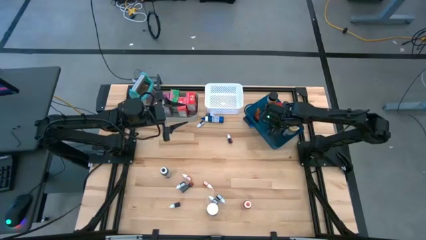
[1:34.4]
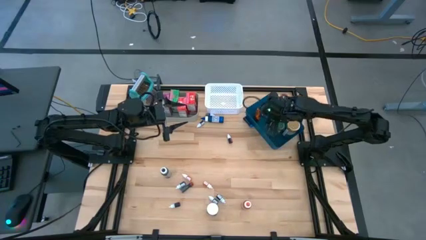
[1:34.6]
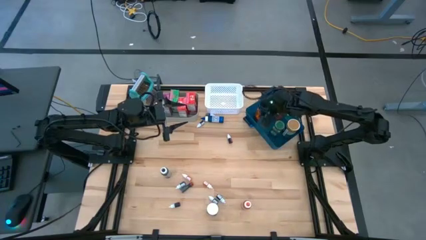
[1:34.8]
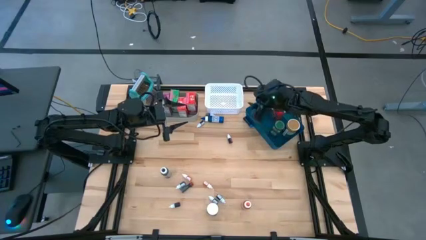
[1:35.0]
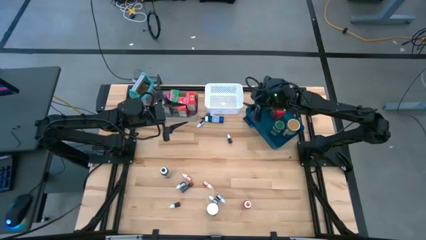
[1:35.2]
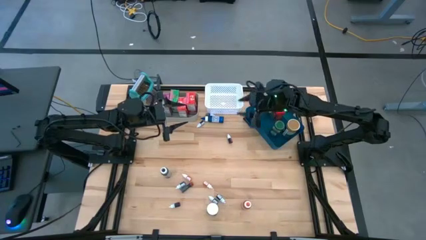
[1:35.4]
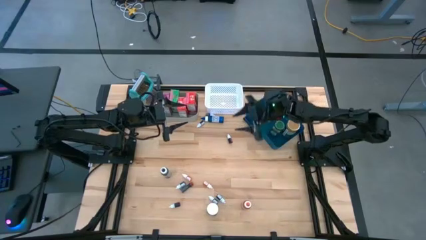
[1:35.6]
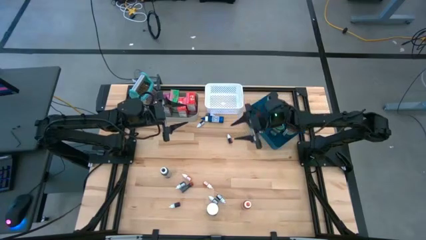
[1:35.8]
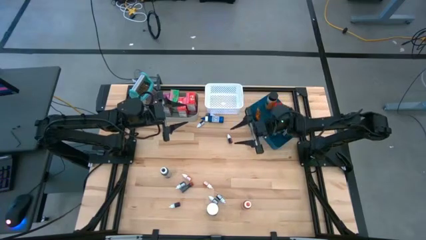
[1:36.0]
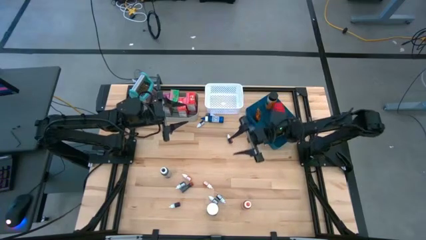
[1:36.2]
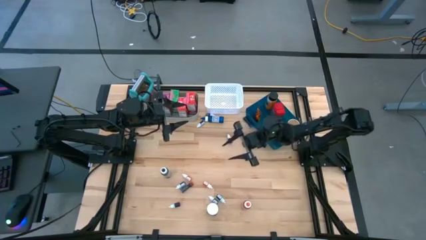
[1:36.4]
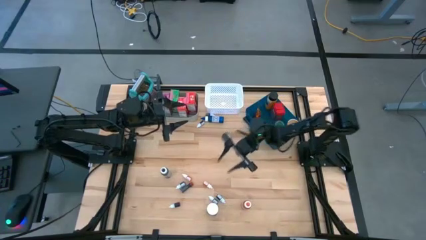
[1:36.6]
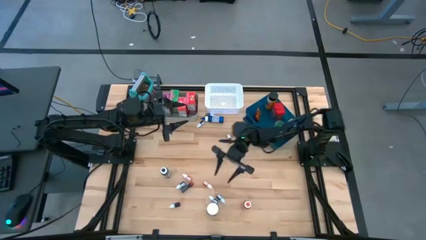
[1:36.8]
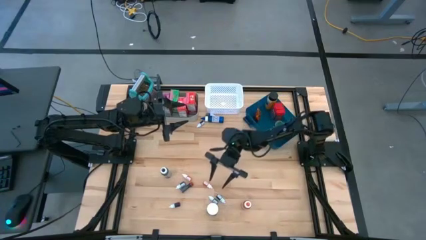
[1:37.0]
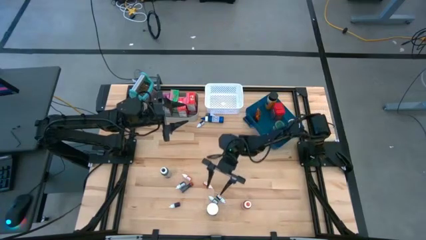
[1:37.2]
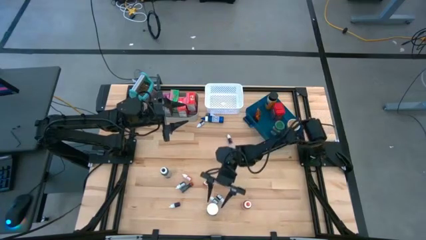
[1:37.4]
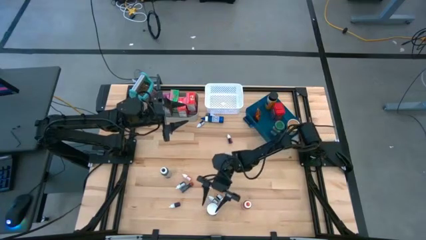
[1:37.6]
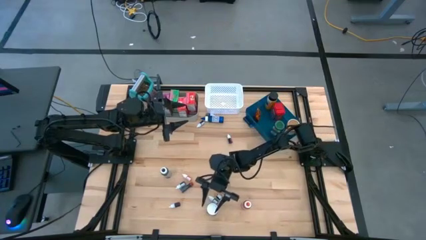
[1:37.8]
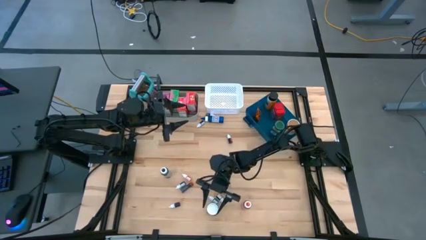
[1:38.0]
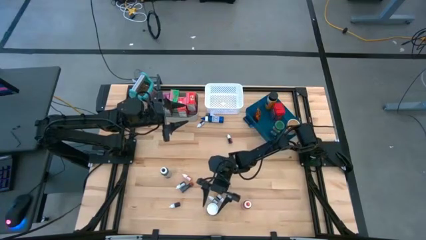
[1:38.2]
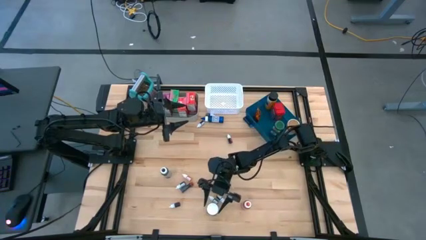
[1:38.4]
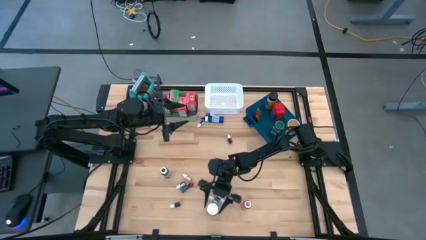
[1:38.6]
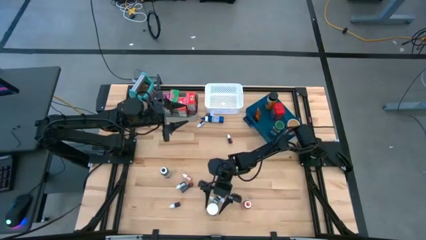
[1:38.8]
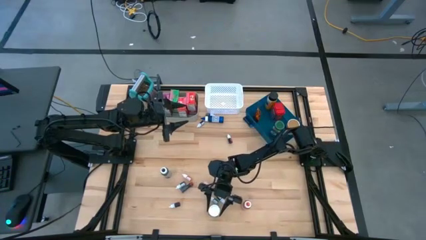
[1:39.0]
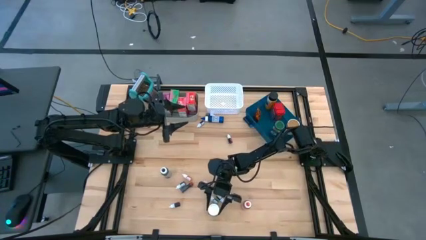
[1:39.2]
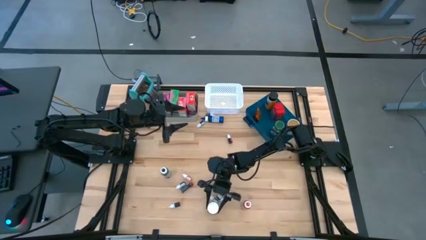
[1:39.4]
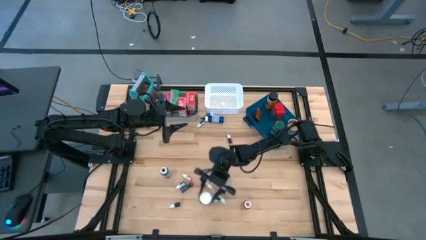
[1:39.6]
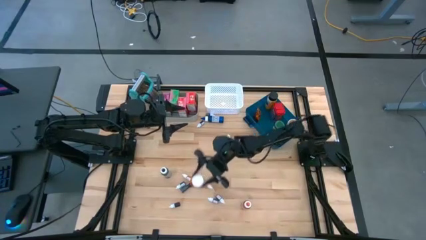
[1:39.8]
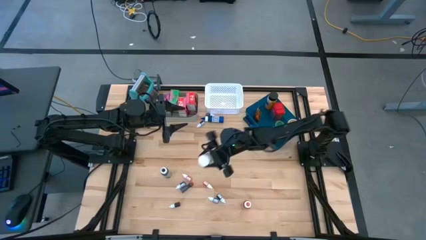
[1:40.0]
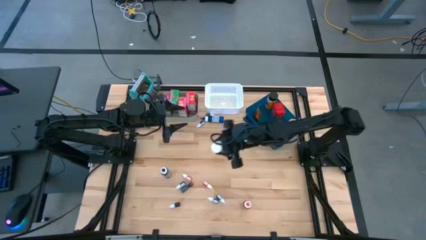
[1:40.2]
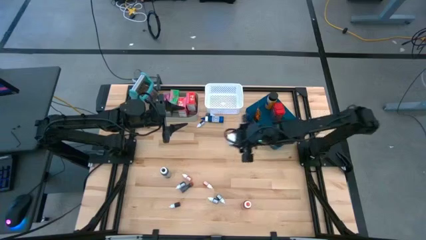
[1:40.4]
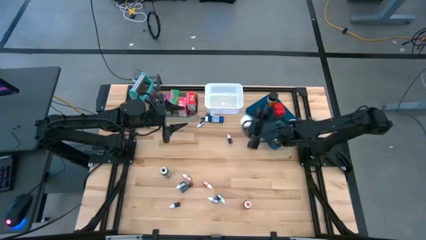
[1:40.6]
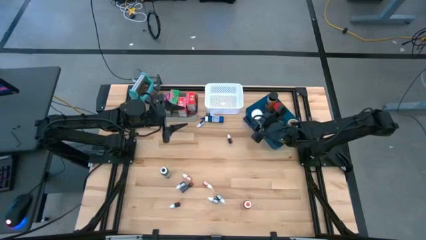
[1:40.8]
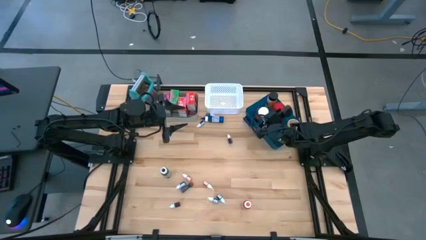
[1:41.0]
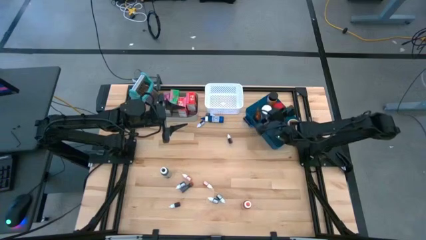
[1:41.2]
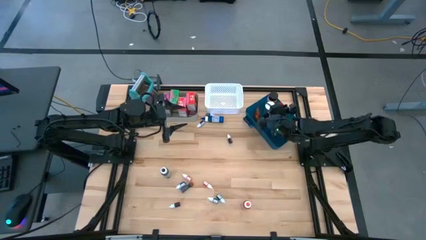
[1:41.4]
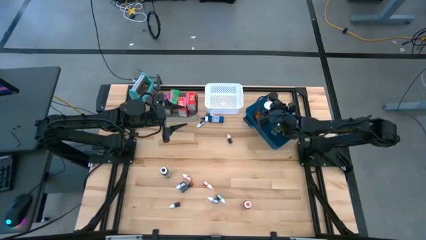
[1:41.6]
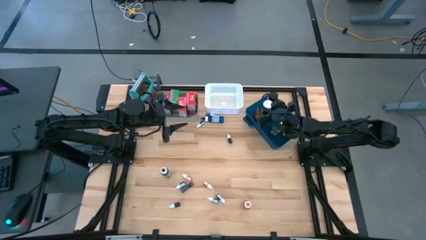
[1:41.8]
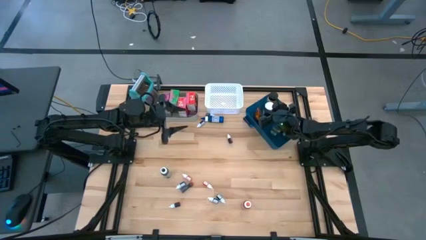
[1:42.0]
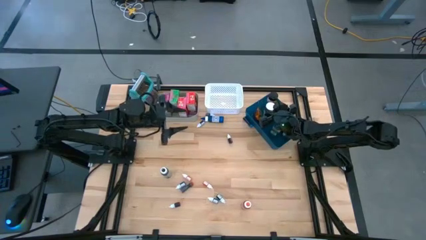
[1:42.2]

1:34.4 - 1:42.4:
Task: Pick & Place Kitchen Items
Put the white seasoning bottle into the blue bin

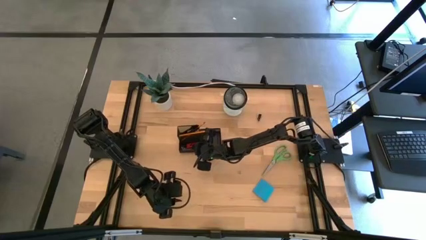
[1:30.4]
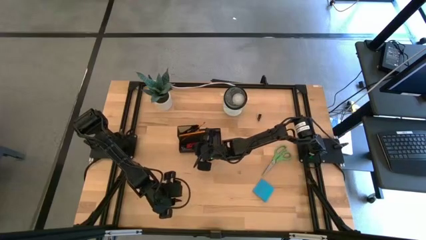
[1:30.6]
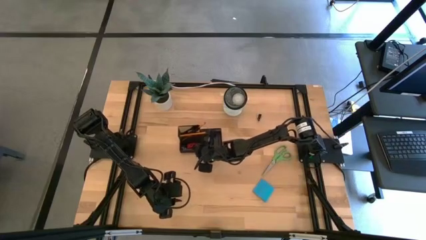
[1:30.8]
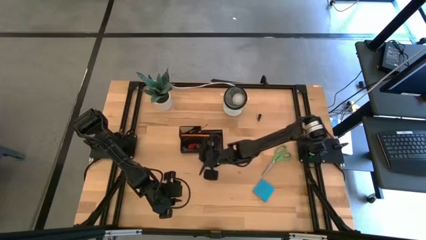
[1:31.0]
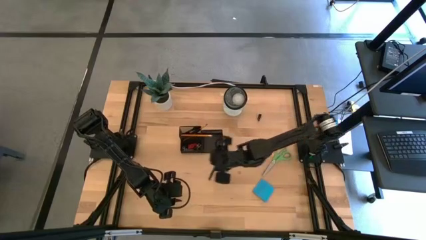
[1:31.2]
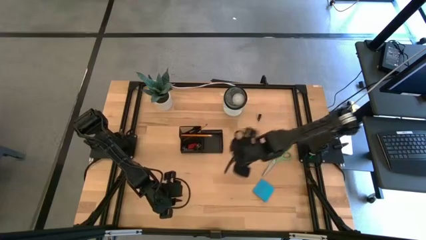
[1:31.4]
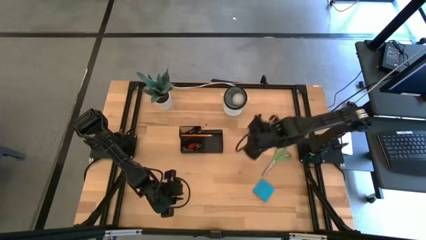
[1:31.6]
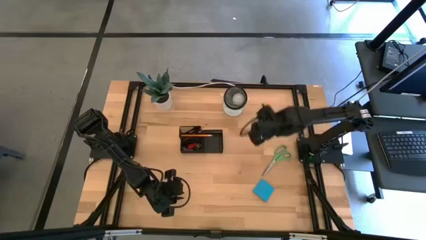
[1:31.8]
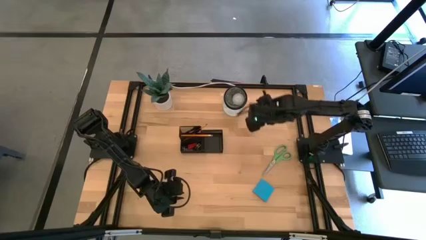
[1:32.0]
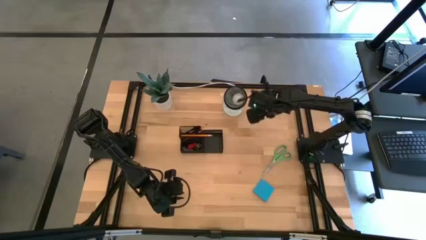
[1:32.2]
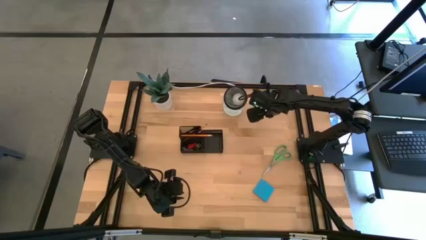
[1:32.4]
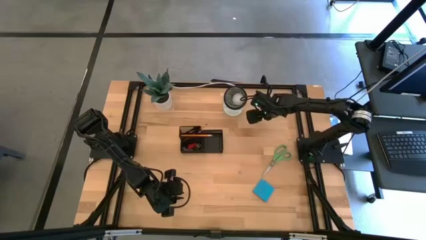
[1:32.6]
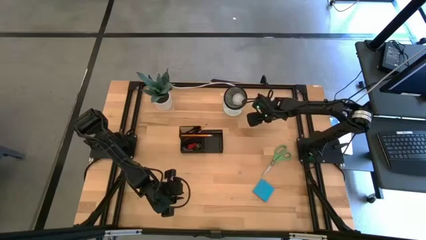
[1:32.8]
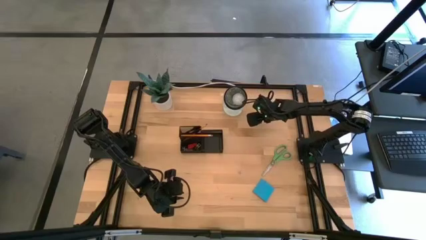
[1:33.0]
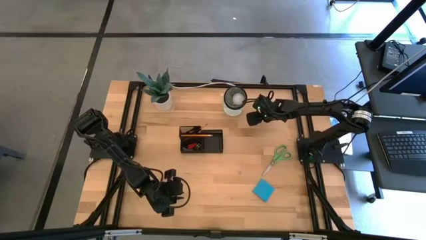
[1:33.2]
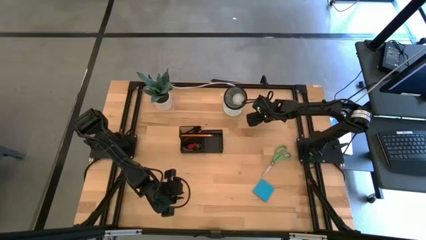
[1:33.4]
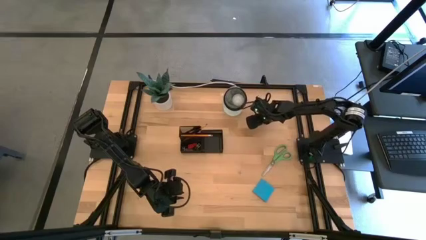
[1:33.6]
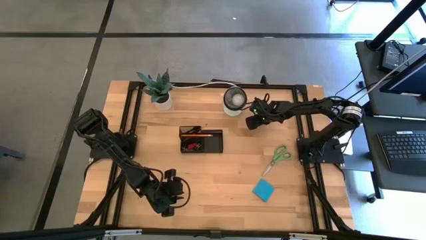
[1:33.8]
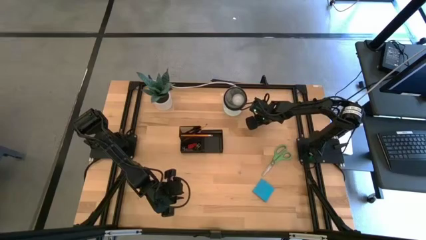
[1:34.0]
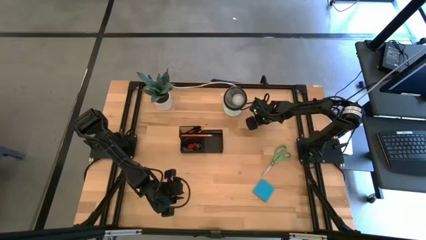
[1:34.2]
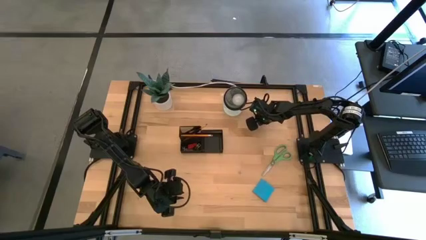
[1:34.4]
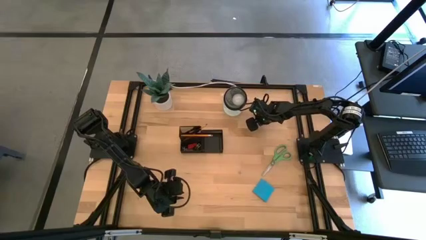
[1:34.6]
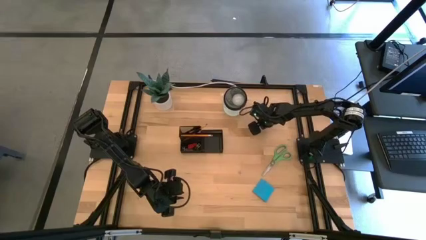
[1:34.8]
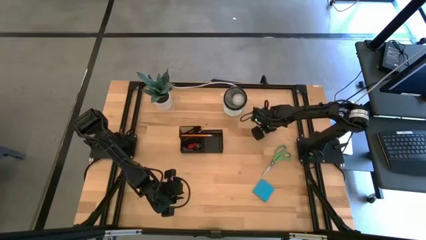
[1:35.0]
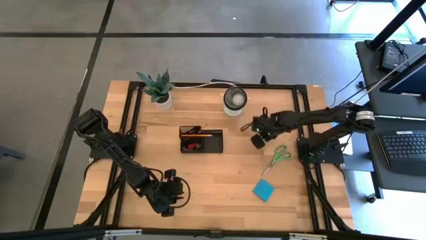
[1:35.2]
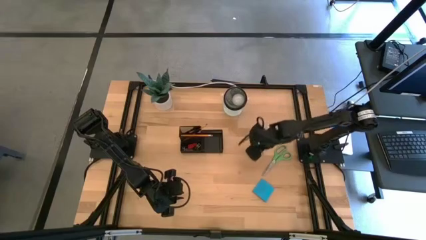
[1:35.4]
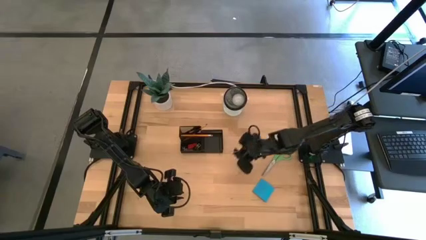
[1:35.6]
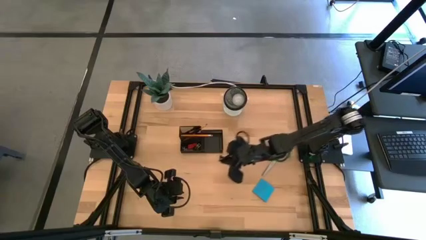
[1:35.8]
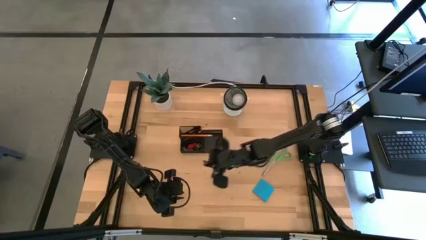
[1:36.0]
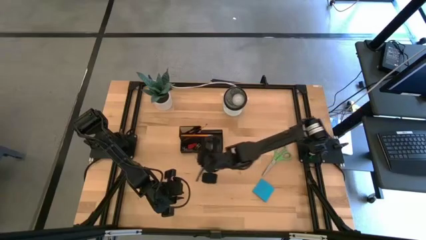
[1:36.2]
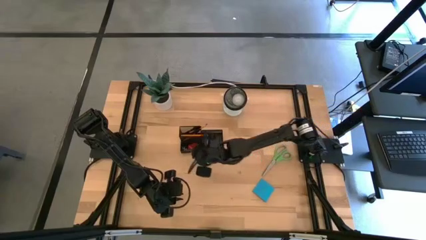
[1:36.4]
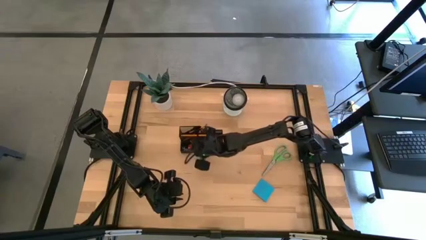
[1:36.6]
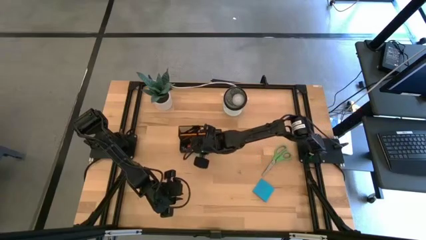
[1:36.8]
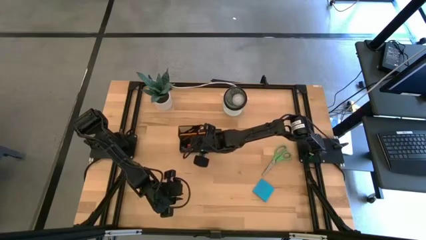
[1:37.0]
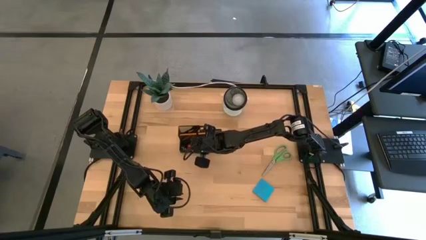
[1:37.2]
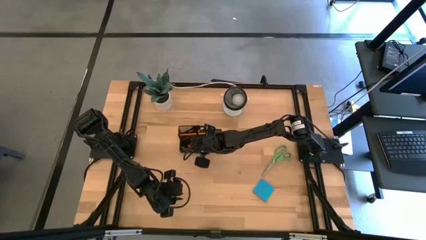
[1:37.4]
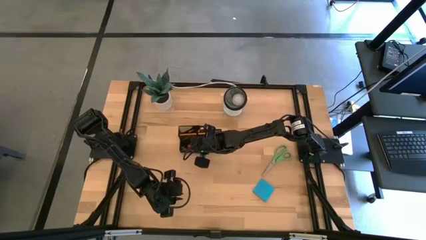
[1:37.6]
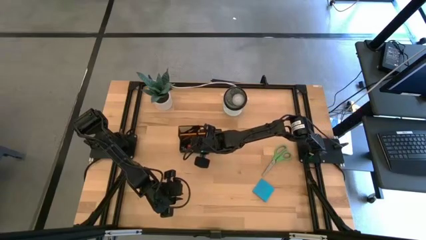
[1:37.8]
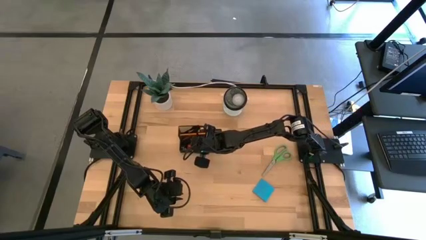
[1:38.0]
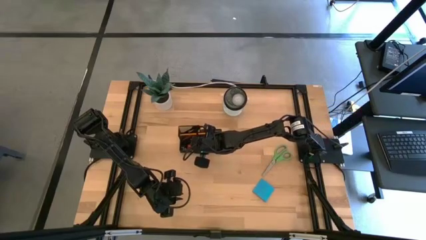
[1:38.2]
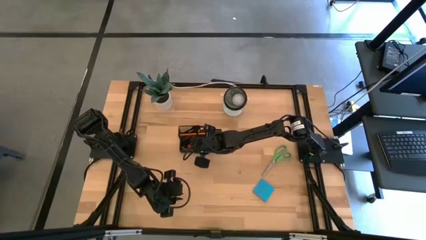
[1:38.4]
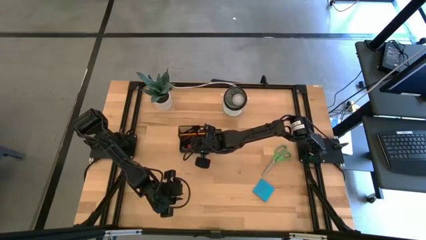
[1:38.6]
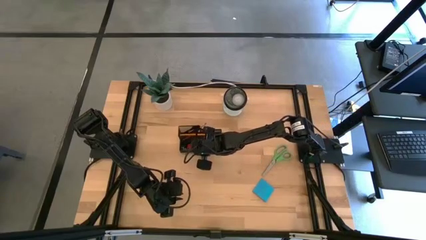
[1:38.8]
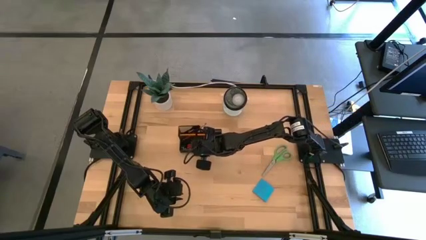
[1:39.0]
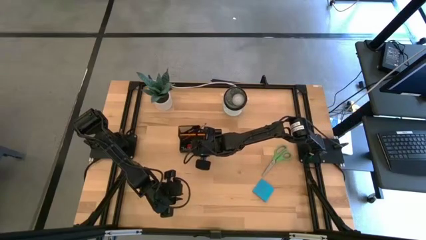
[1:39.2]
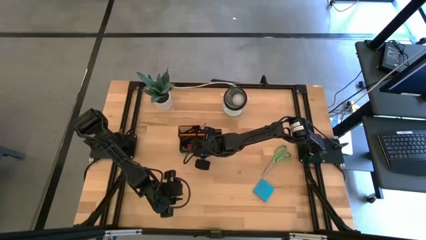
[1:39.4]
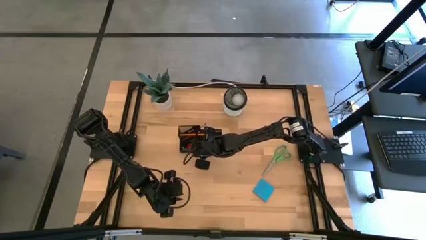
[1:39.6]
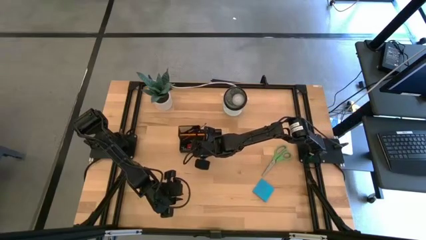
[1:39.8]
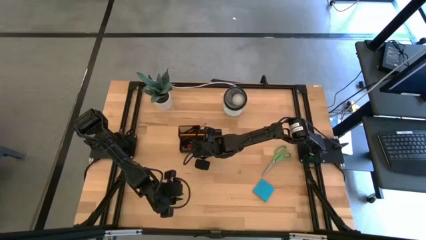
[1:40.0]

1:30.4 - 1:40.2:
Task: Pick and place office supplies into organizer
Put the black binder clip in the desk organizer
